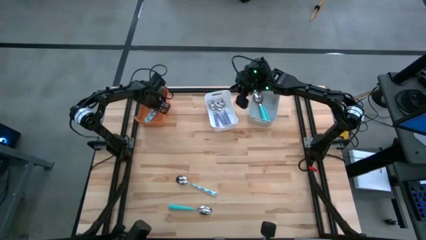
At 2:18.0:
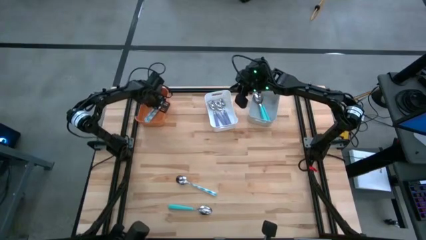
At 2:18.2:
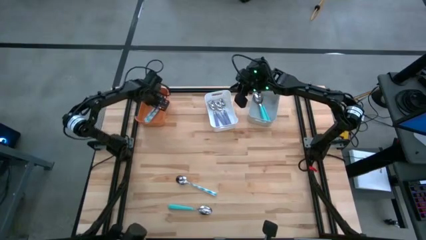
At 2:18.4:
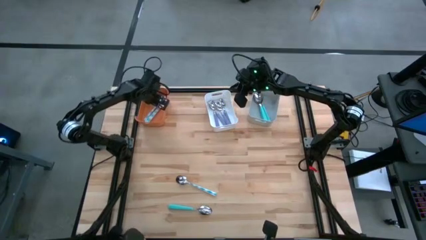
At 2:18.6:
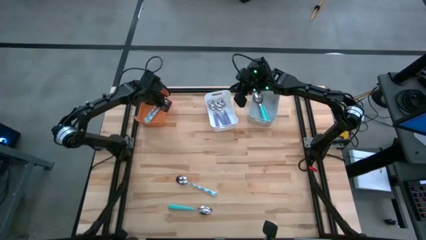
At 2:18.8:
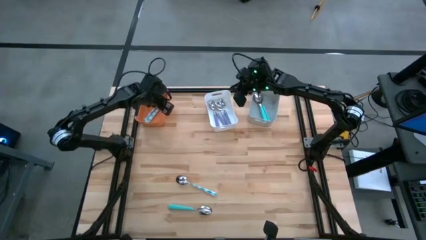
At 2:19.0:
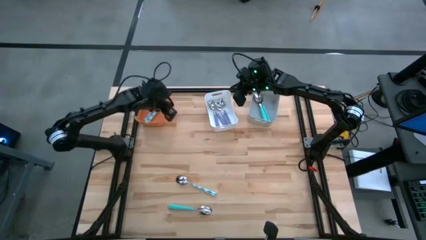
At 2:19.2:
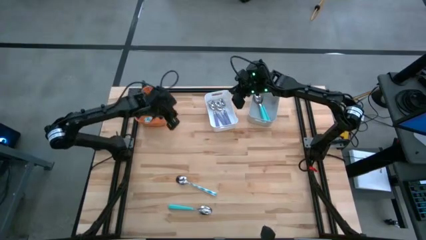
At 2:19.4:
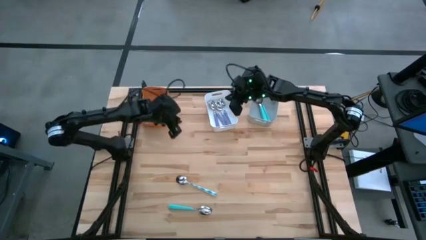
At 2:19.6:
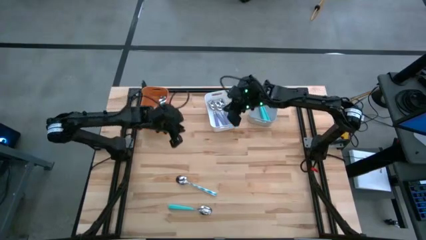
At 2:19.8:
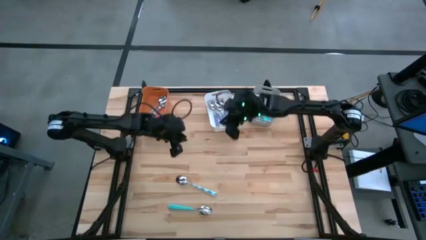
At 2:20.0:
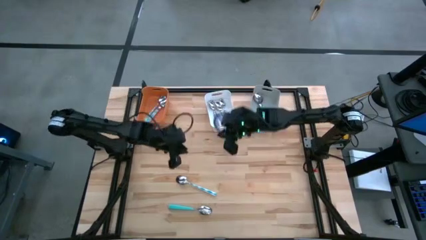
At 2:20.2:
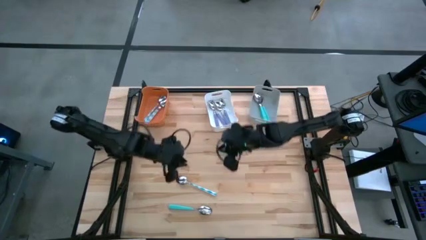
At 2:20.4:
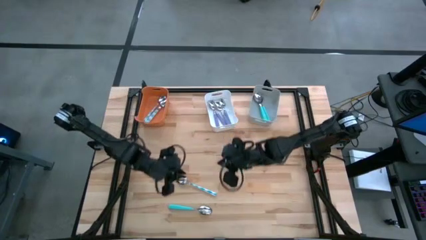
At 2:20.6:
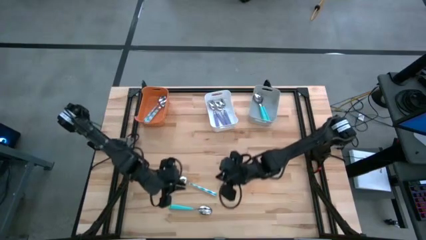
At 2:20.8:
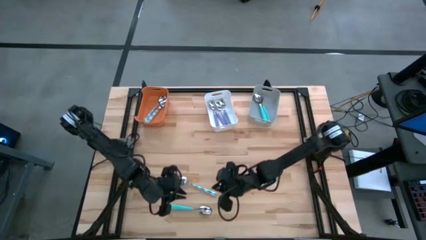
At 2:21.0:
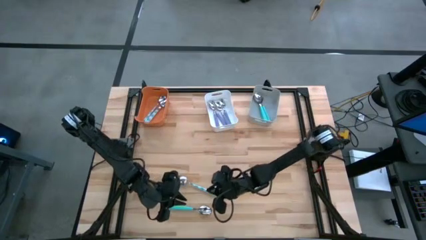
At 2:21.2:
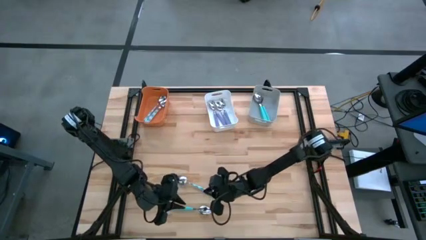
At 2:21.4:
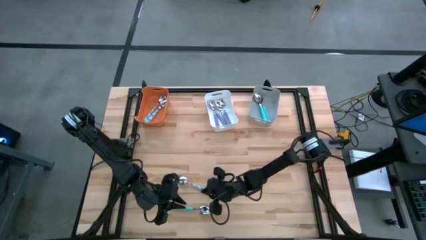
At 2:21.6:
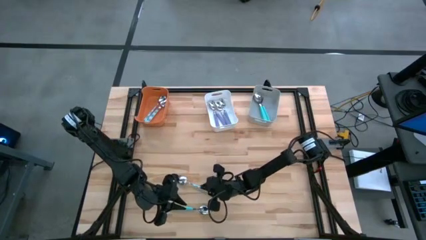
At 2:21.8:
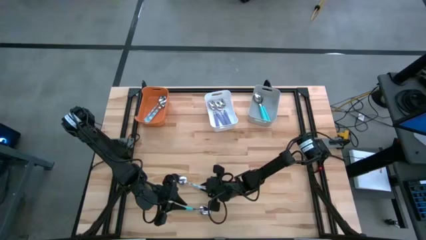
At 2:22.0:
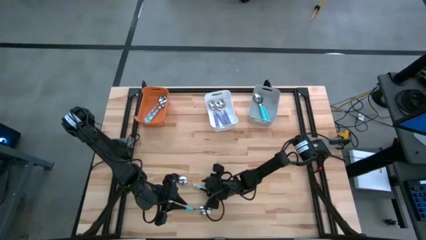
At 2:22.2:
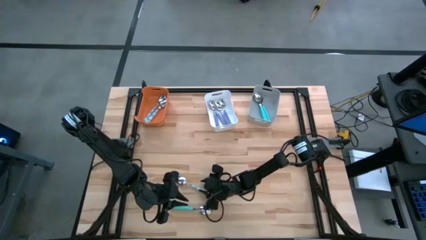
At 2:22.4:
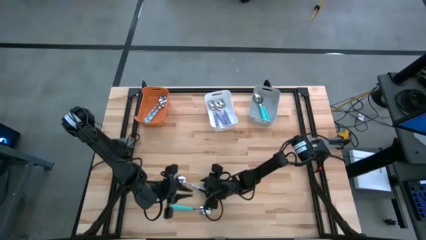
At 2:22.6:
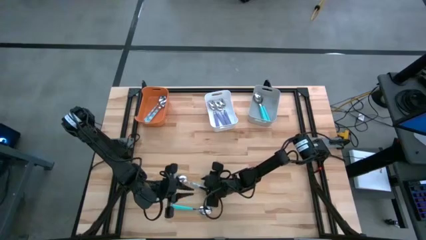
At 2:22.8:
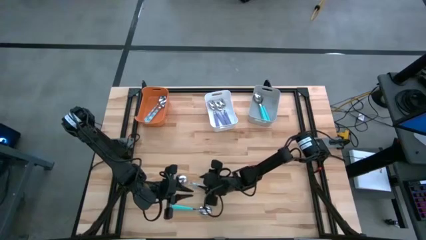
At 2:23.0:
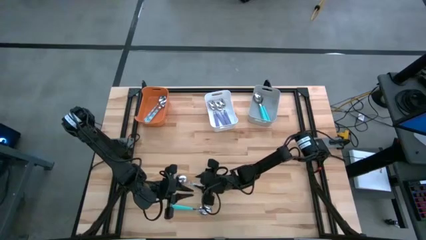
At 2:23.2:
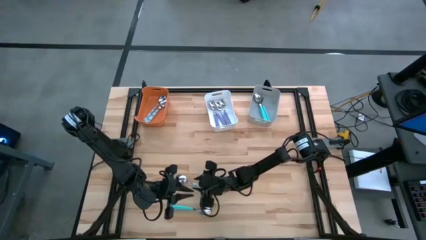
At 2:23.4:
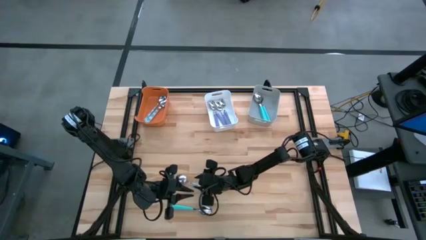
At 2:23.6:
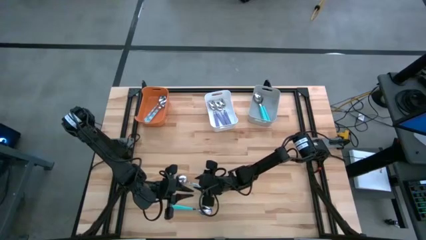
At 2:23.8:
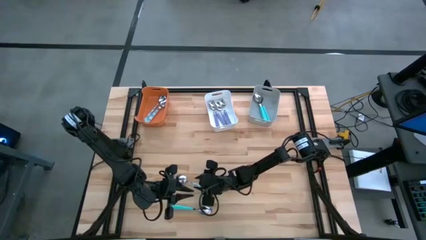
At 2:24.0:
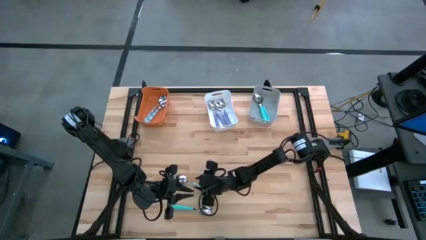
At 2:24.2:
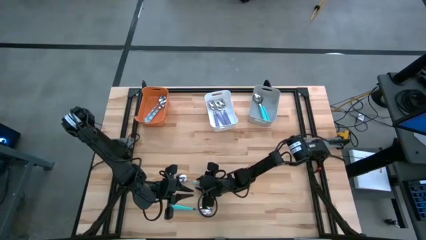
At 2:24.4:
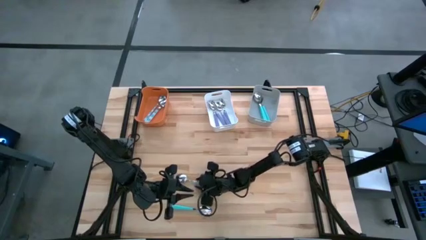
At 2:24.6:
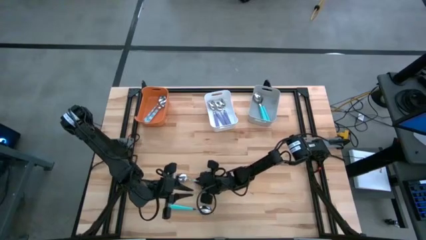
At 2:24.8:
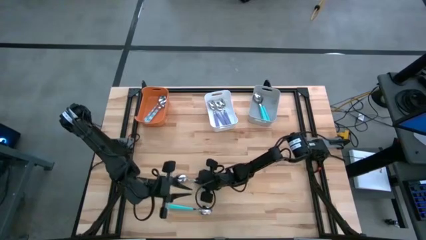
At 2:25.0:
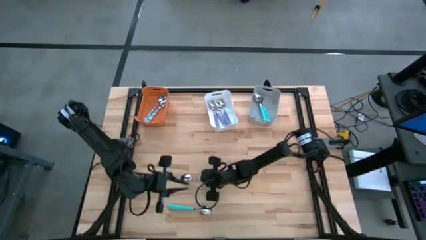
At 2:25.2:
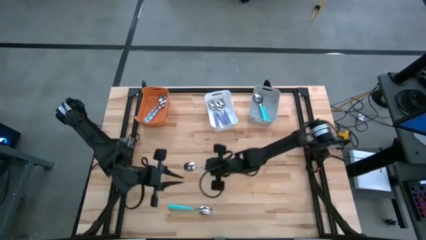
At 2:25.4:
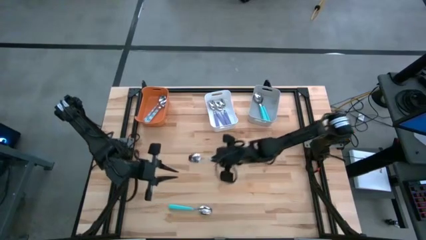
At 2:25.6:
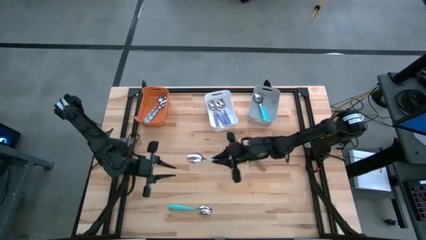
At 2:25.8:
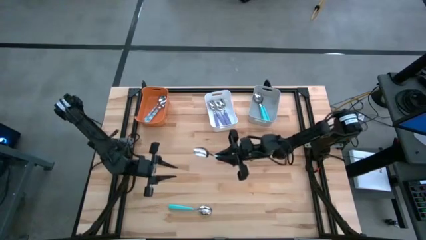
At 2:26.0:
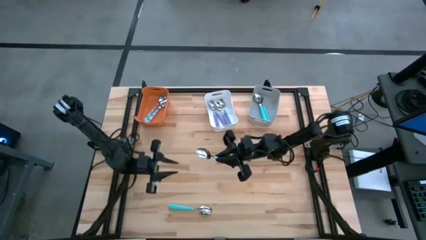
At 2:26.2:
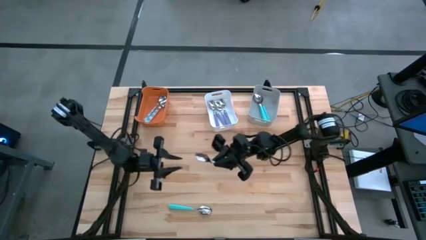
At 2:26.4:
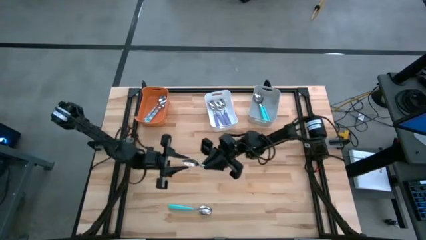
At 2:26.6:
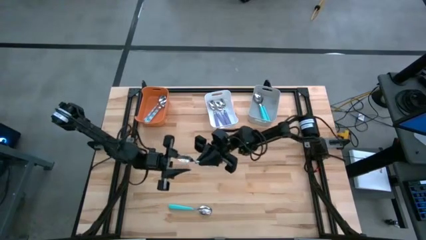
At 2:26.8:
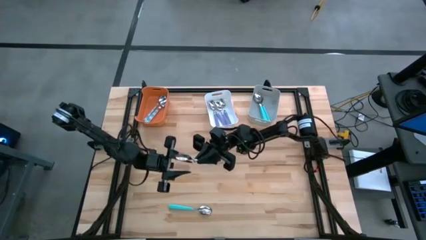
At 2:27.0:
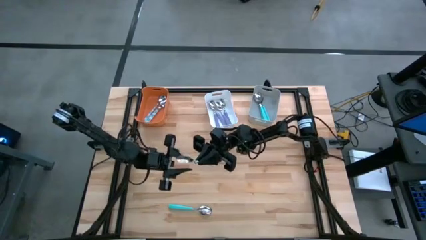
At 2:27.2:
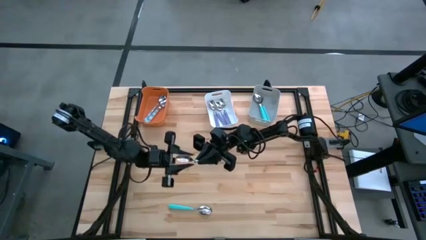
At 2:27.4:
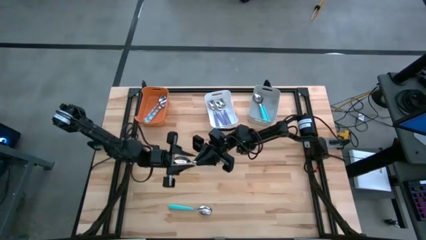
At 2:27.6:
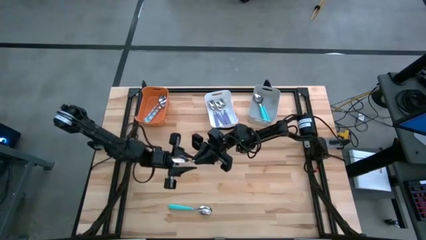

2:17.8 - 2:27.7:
Task: Sort silverware by color (type)
Put the blue patterned spoon into the orange bin
